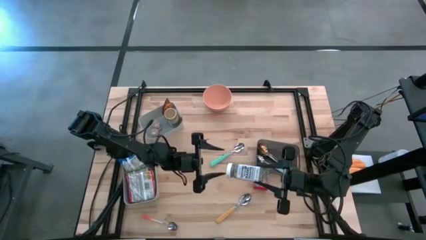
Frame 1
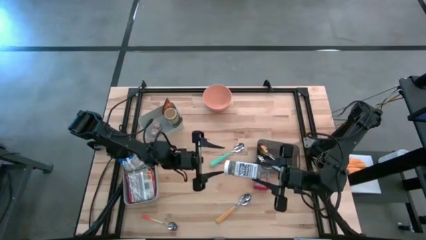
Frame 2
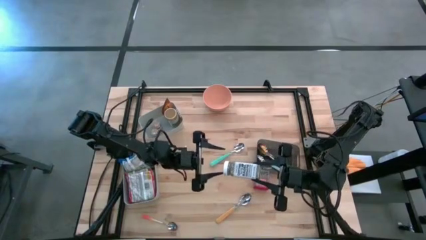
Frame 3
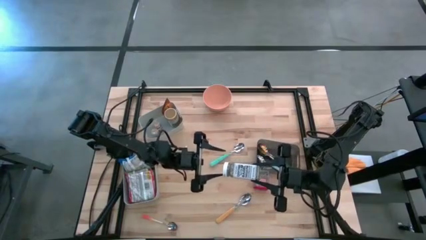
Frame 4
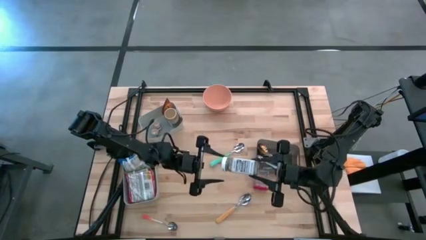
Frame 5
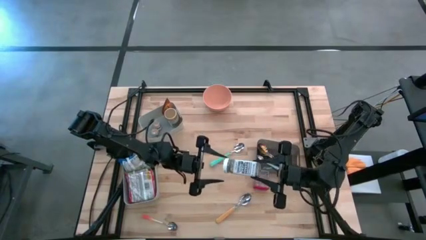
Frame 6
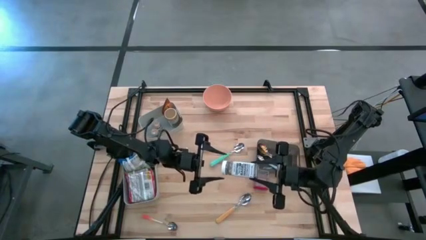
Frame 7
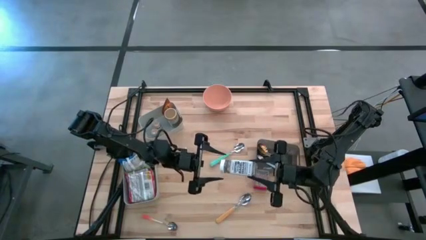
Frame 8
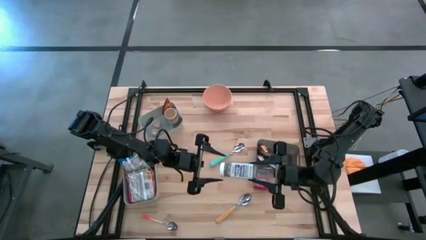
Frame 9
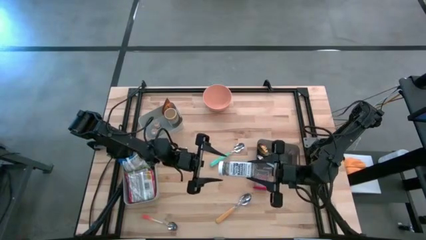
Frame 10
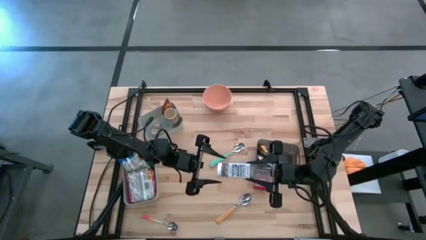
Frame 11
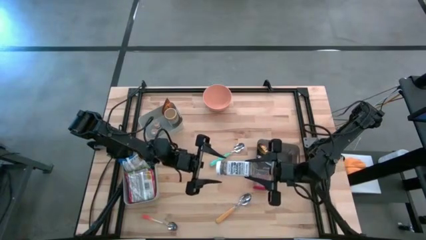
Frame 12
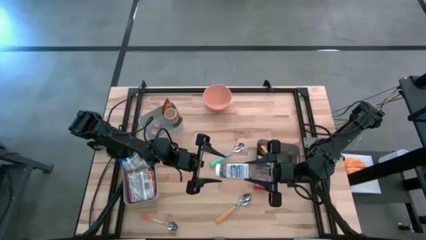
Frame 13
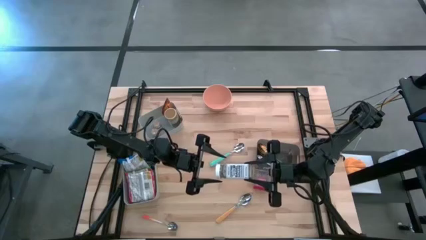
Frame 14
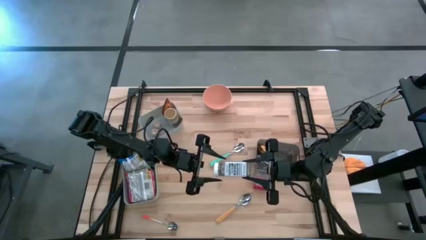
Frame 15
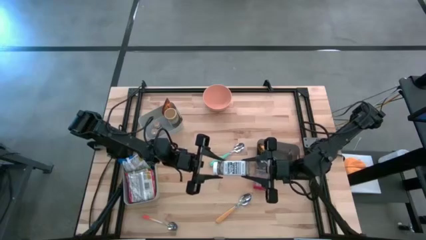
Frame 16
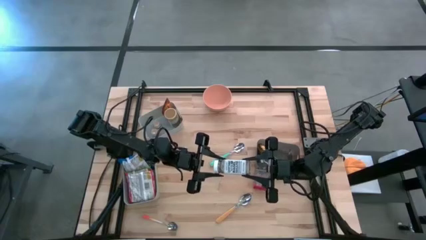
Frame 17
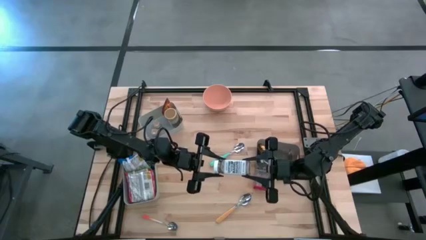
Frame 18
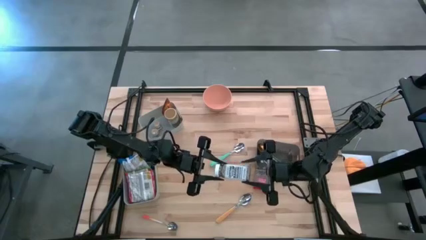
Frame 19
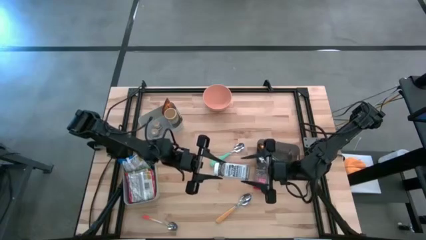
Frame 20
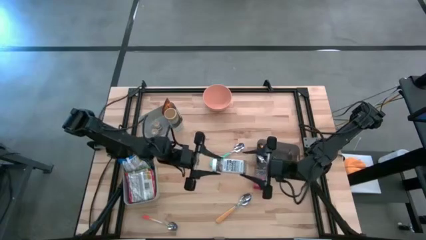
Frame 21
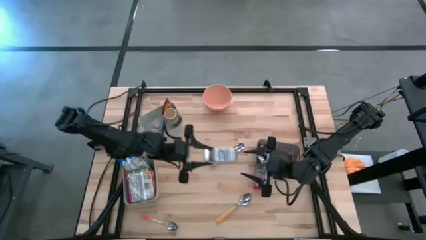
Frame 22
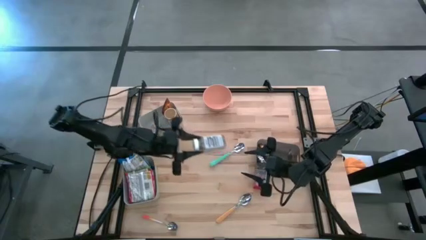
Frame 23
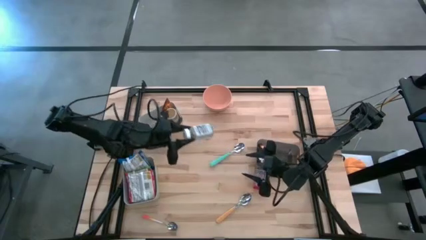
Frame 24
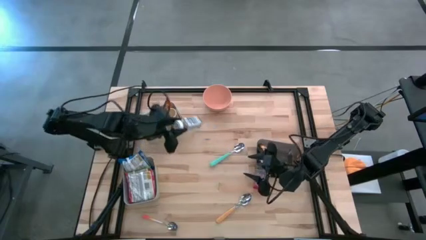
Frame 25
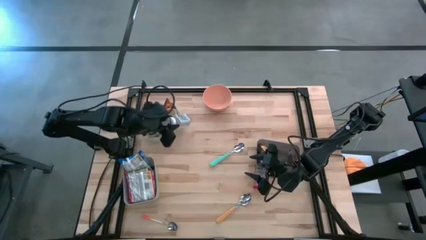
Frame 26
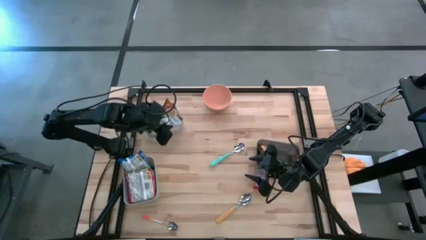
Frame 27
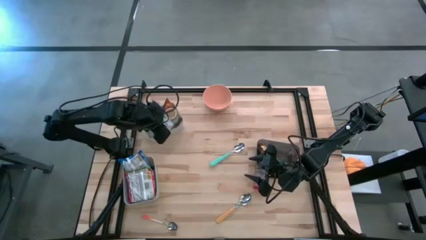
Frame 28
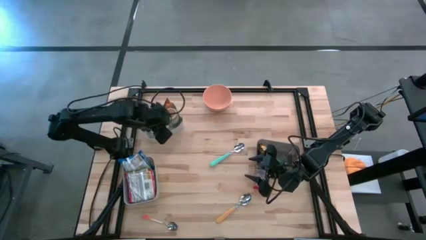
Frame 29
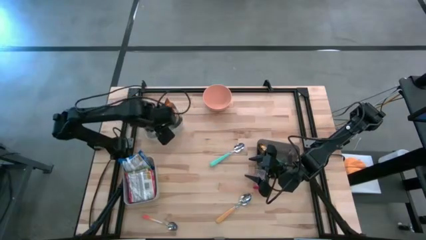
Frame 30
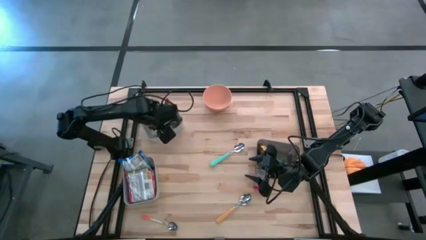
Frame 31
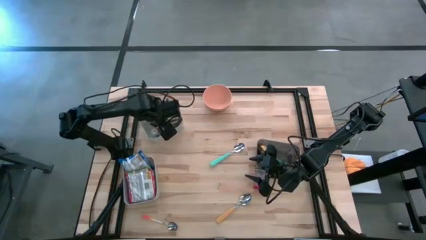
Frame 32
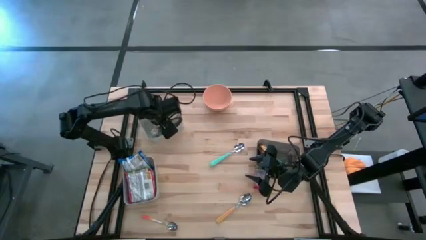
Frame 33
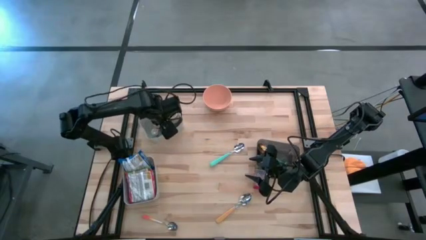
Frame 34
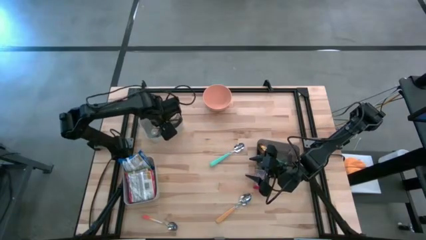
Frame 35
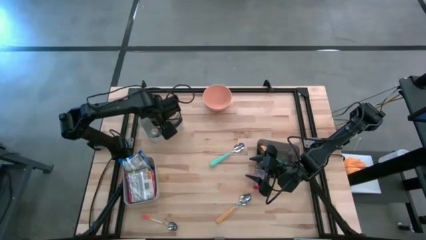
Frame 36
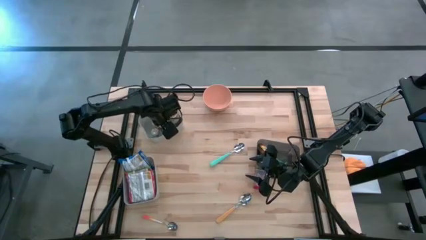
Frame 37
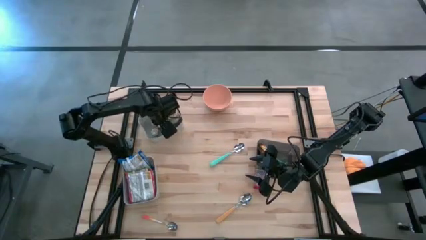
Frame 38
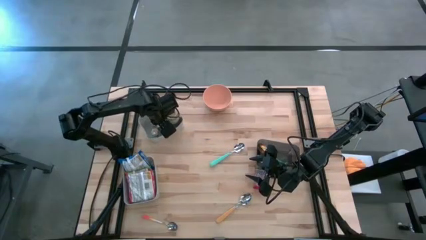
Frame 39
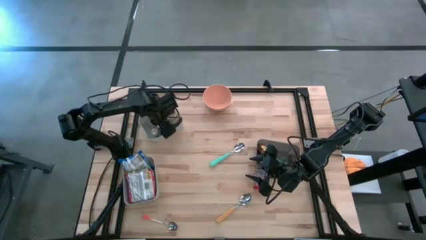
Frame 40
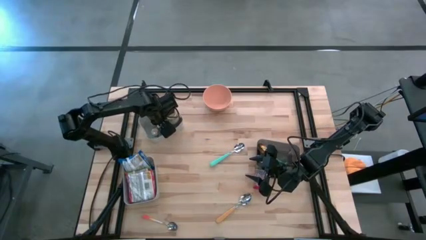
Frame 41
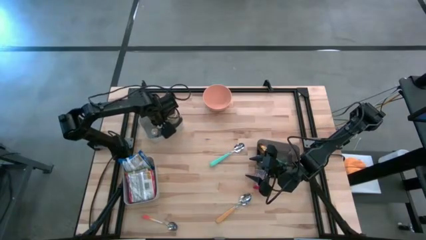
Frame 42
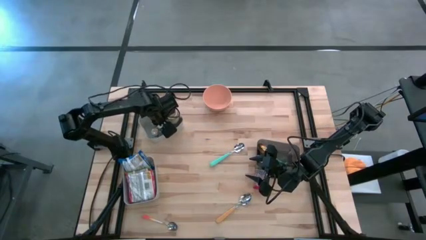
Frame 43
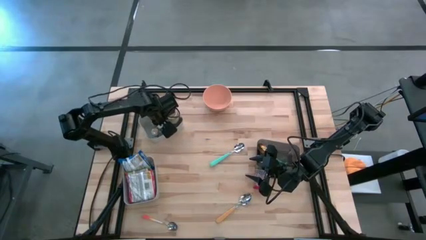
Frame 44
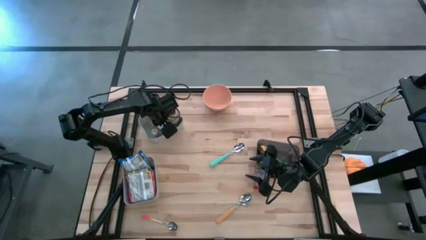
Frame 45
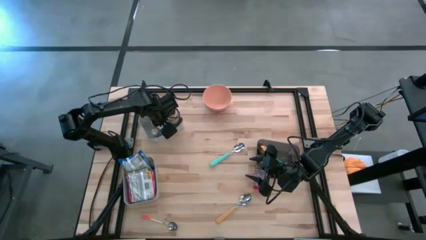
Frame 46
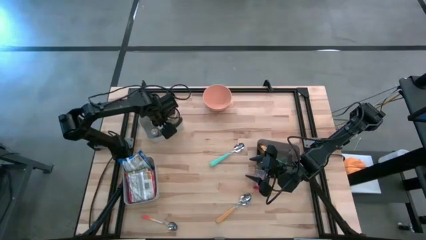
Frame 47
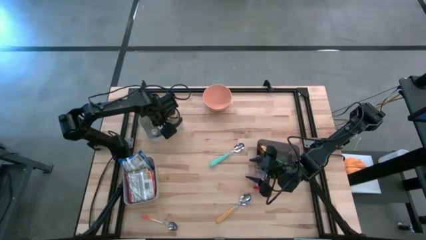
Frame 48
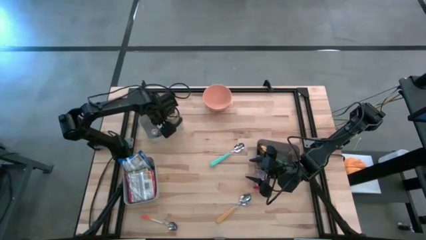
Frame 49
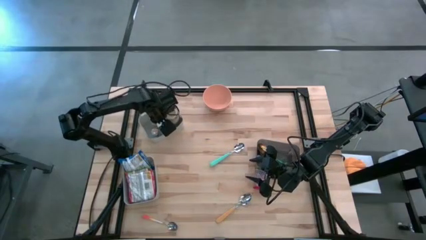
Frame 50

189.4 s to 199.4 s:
Put the bagel seasoning bottle into the top gray bin

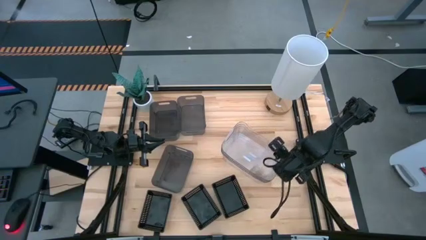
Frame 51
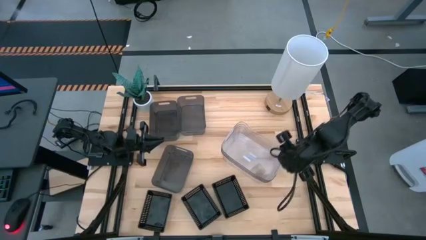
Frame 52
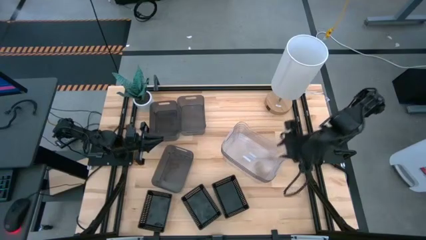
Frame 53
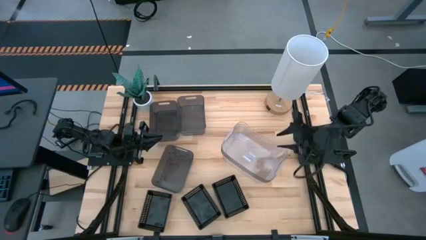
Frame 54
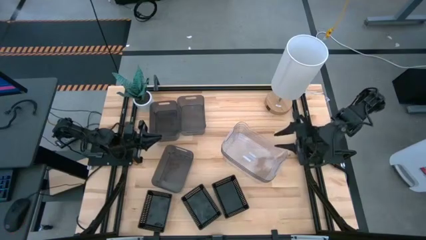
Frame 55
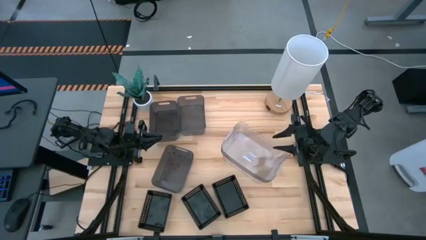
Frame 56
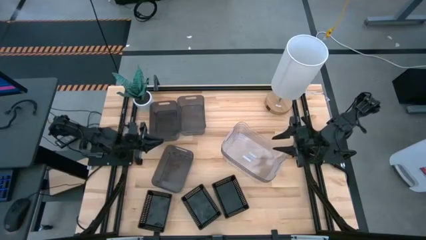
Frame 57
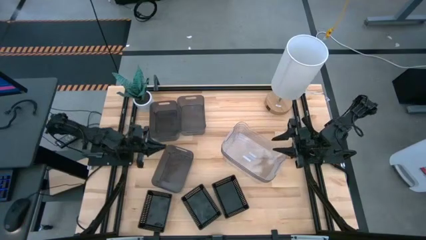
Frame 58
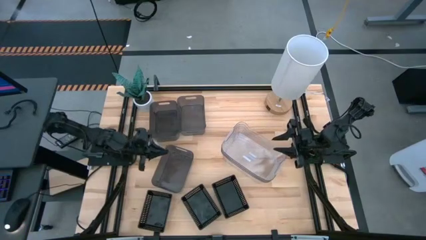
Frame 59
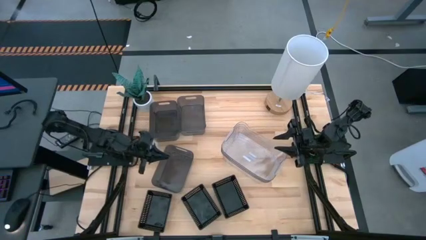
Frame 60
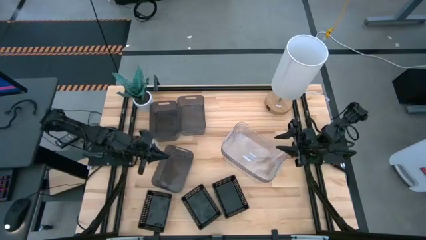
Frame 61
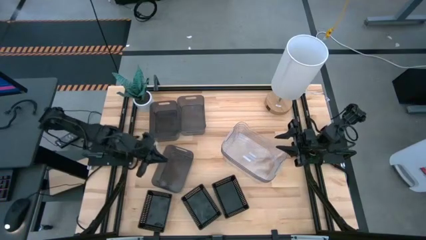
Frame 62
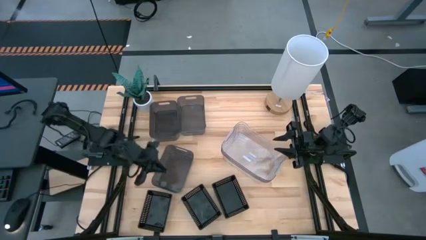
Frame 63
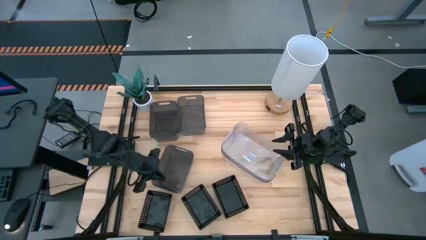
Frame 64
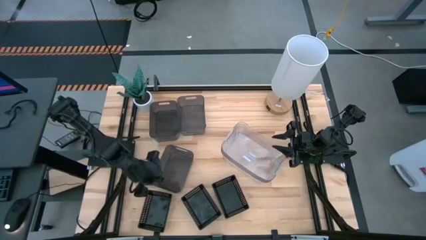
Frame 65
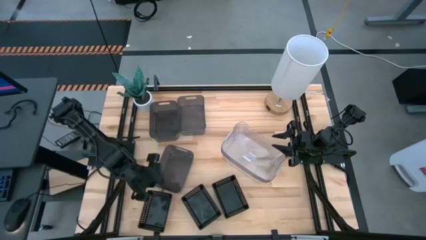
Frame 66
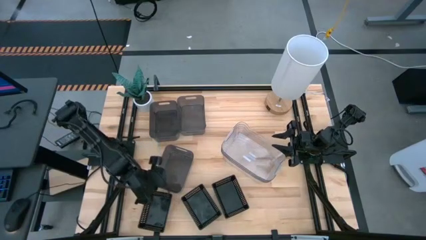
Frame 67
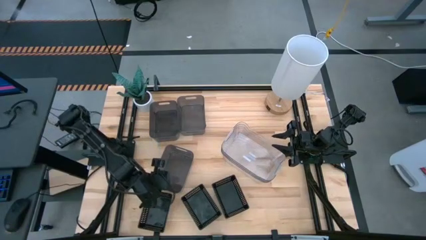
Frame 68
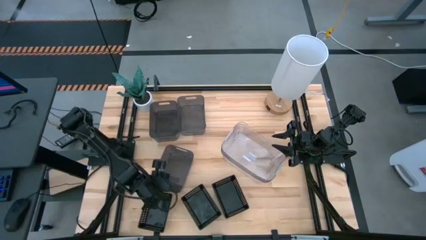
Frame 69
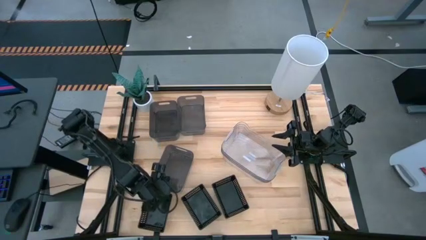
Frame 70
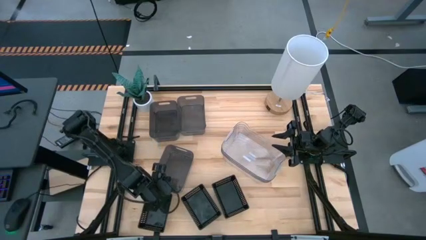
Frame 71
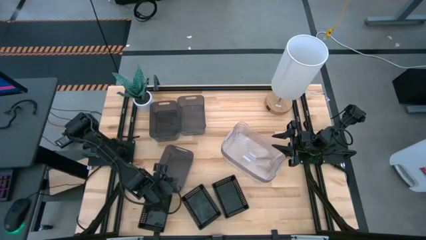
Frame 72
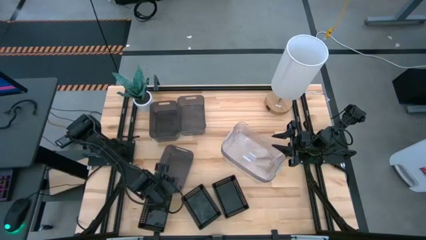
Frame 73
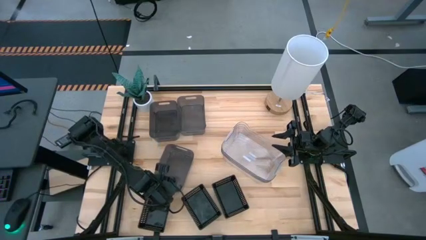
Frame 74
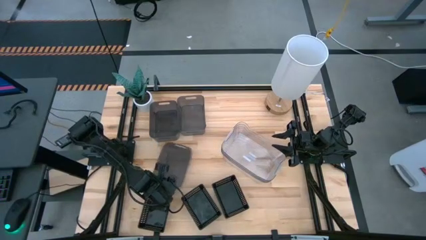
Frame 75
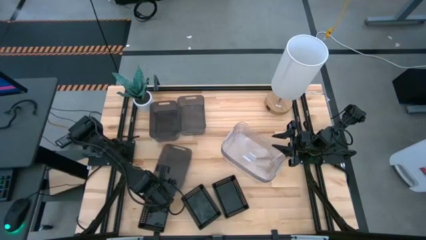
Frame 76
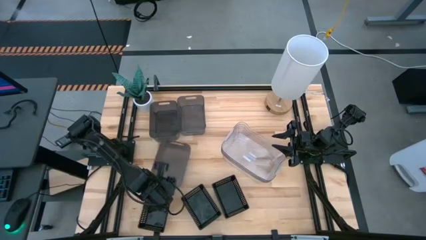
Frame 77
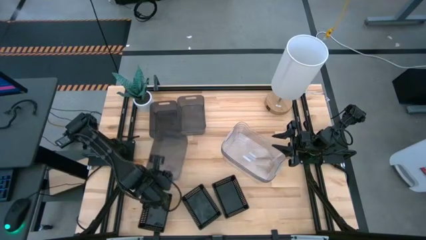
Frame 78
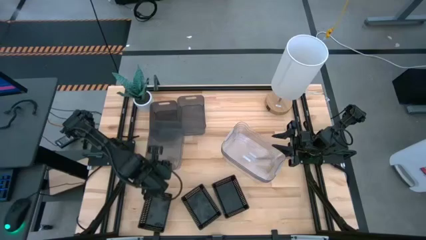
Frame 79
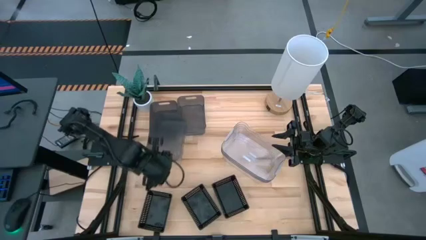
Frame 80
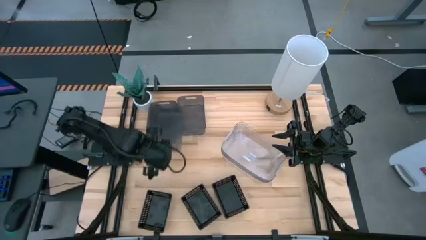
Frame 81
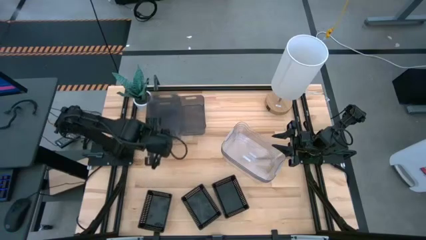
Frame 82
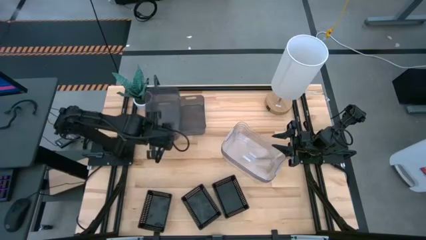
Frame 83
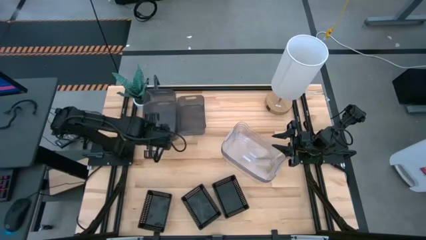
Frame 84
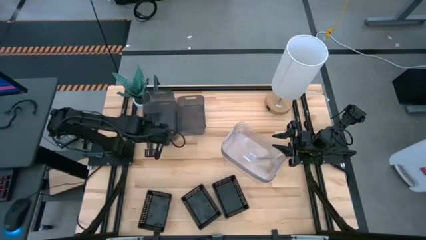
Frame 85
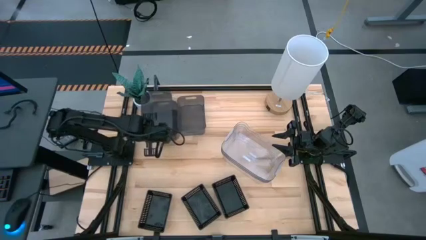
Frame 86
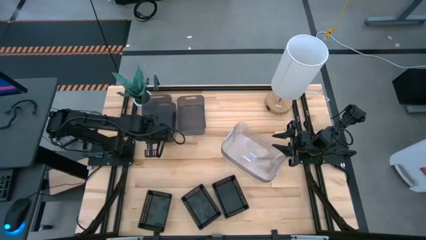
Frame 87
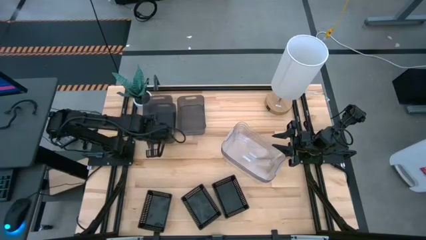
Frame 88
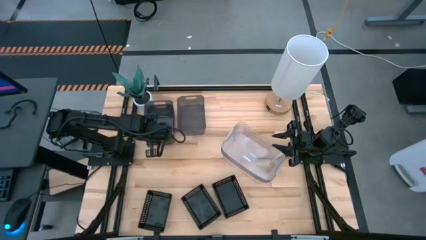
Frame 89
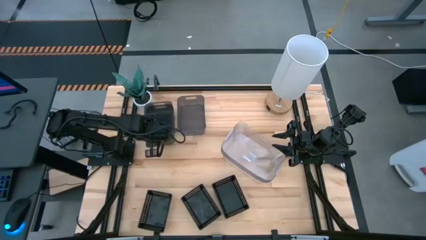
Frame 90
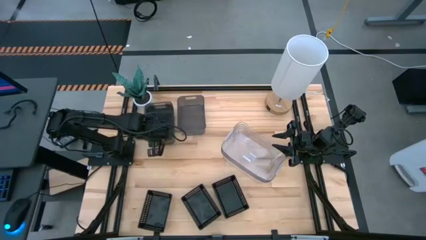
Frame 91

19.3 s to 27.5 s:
Stack the bottom black transparent bin on the left black transparent bin
